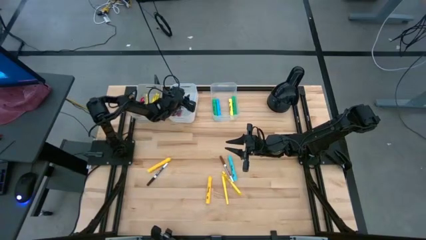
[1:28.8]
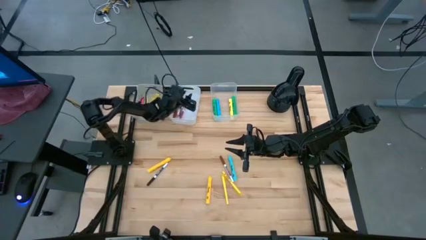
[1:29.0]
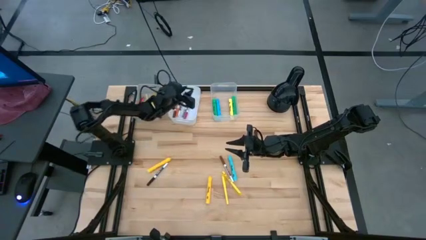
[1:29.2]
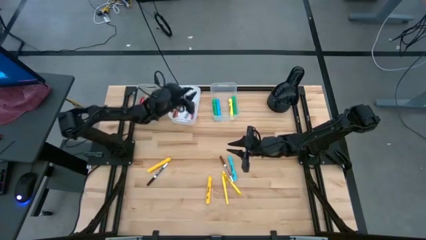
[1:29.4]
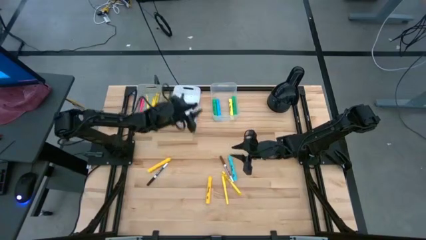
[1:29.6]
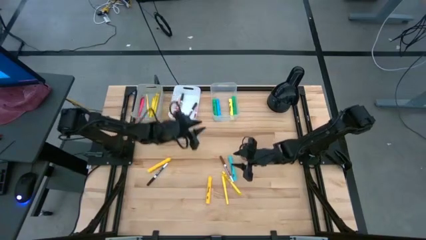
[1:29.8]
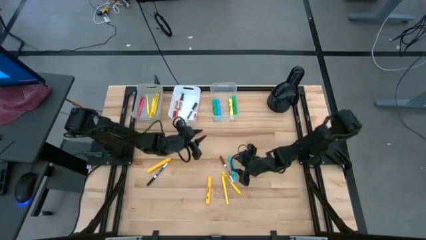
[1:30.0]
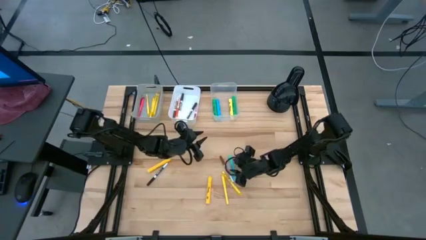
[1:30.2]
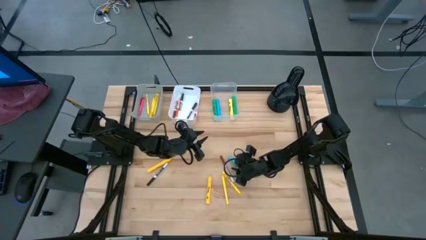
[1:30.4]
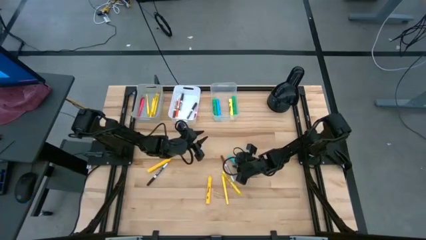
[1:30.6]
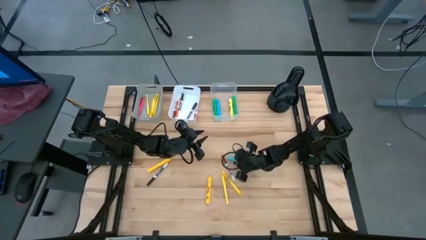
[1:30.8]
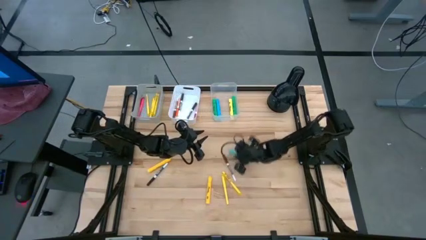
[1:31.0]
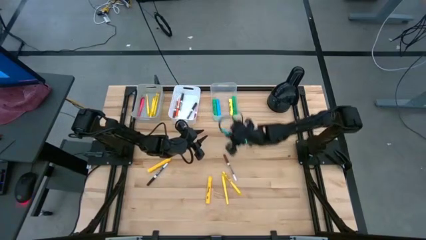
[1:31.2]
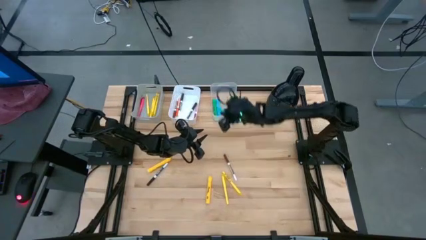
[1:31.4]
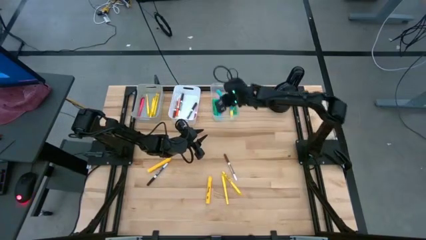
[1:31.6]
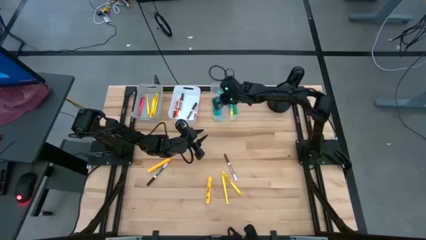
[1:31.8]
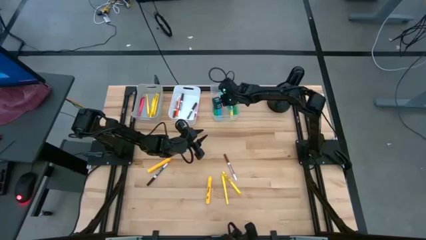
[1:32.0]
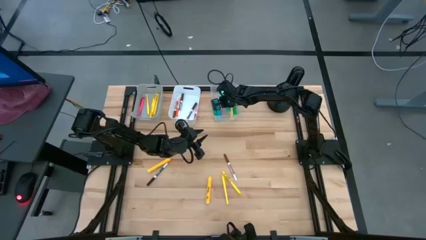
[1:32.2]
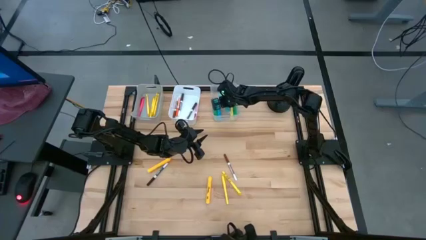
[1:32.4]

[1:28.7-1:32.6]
Task: Pick & Place Markers
Put the blue highlighter into the transparent bin

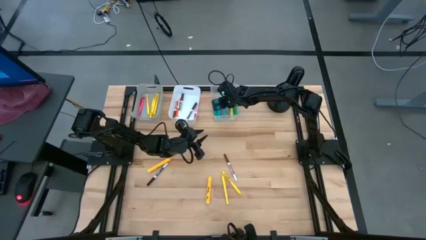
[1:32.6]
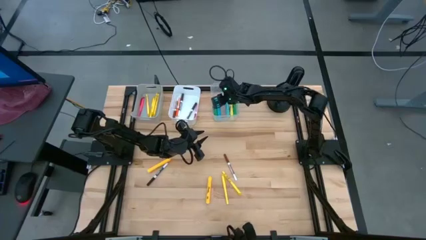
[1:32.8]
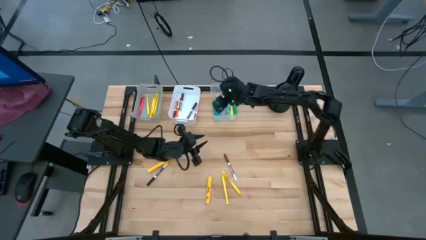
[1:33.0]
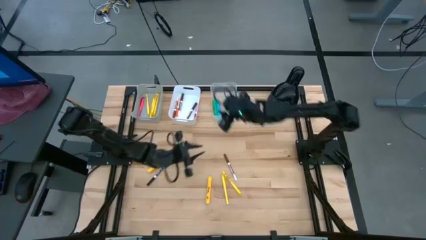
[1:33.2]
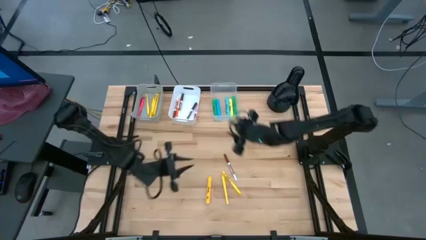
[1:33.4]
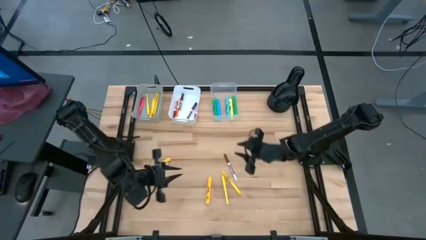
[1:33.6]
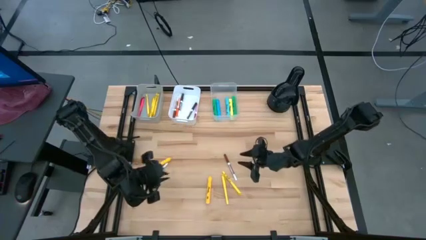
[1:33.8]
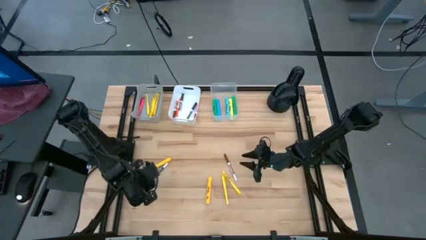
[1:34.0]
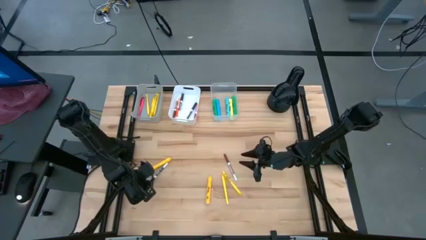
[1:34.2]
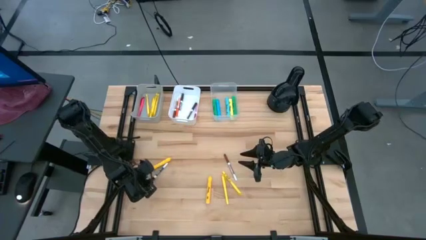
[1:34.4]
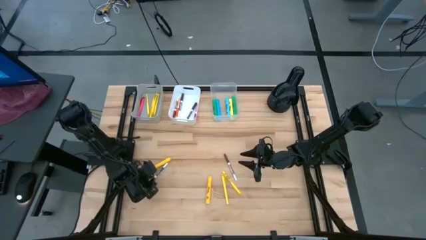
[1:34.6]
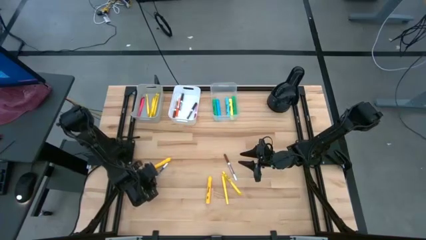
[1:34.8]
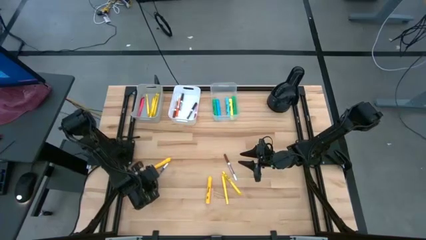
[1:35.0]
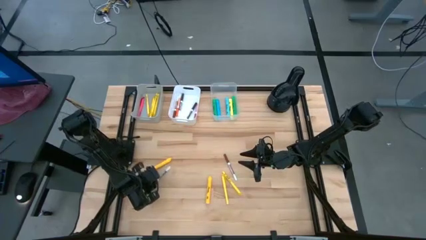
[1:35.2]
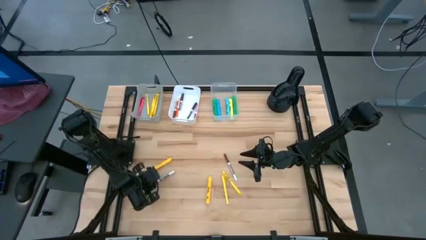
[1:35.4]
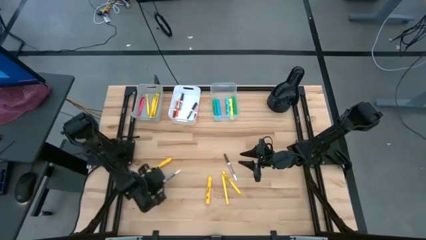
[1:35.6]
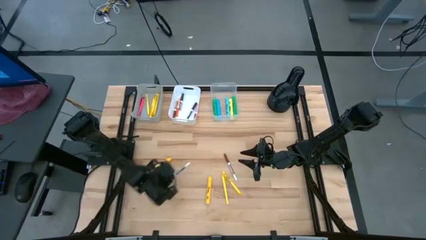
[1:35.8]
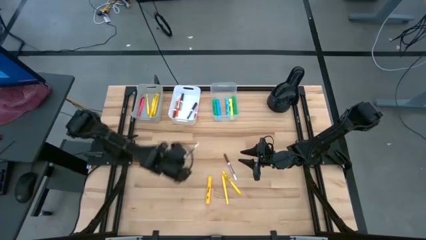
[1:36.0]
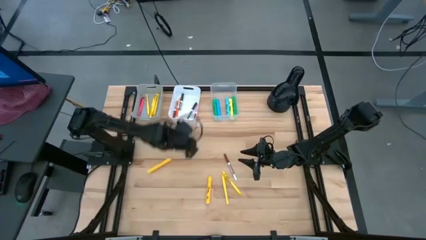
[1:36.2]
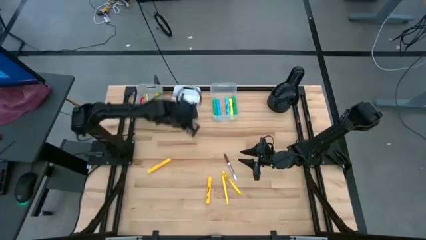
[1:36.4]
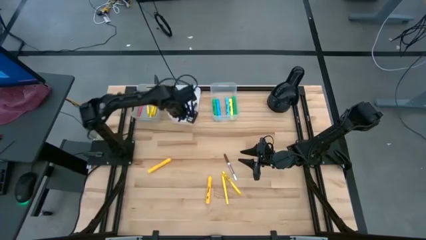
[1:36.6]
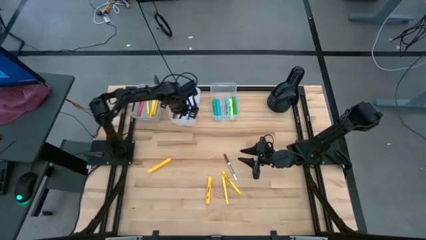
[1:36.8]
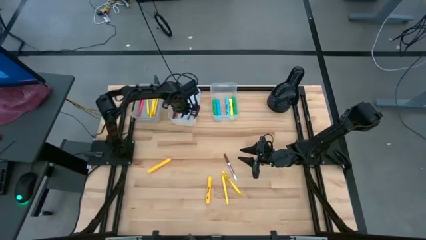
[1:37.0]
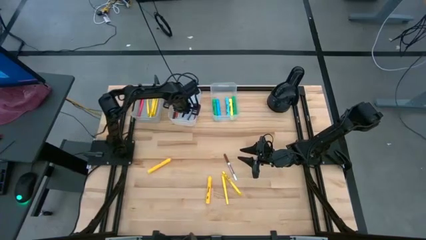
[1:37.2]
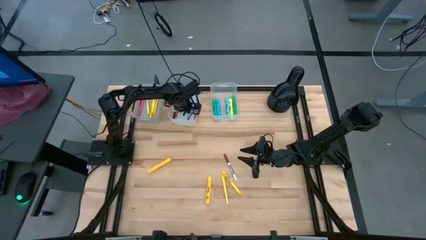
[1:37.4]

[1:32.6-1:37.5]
Put the black erase marker into the white bin

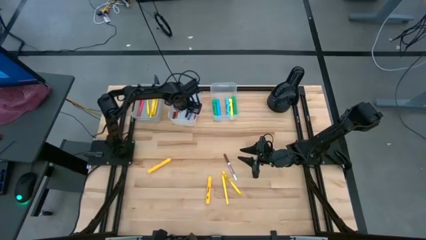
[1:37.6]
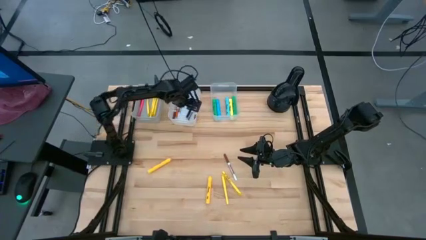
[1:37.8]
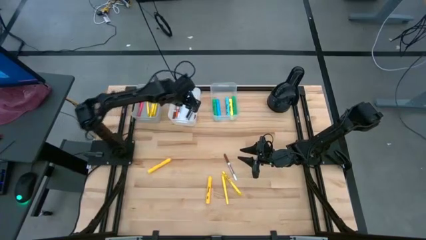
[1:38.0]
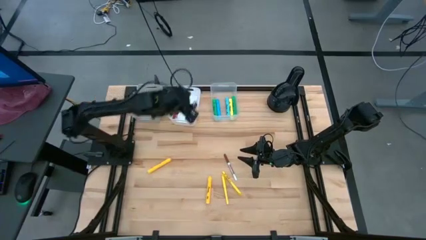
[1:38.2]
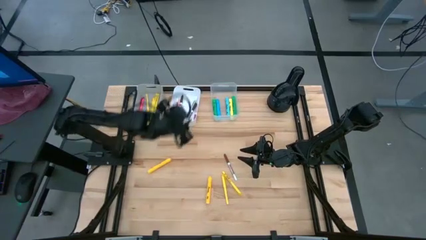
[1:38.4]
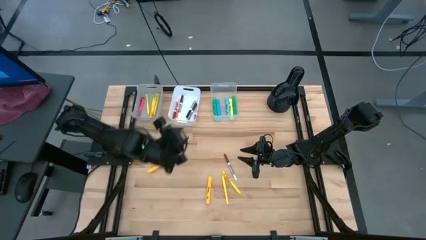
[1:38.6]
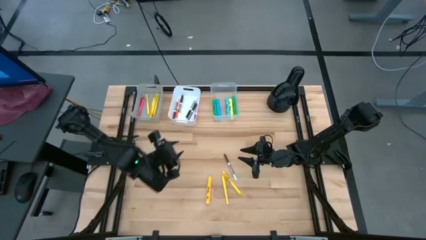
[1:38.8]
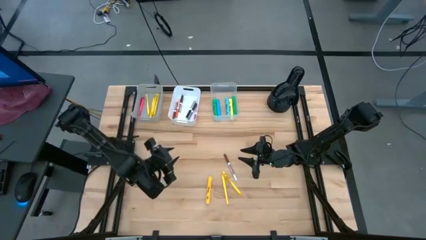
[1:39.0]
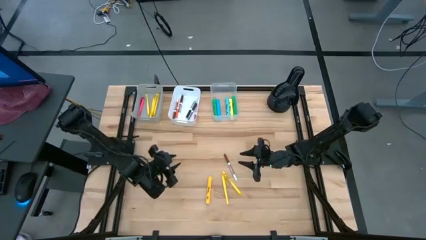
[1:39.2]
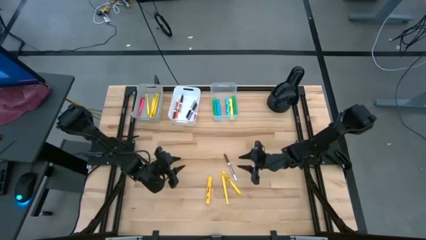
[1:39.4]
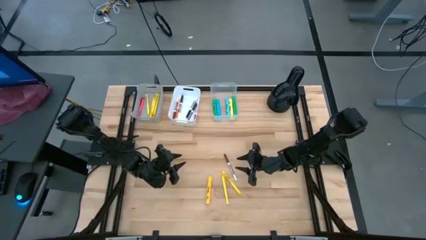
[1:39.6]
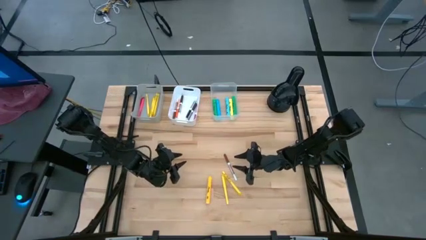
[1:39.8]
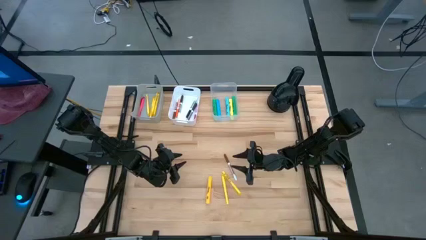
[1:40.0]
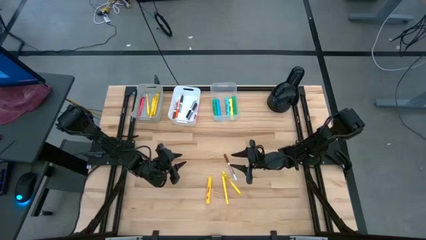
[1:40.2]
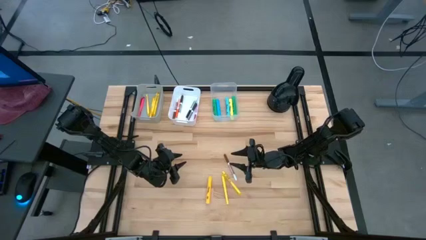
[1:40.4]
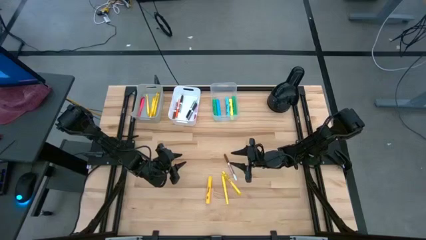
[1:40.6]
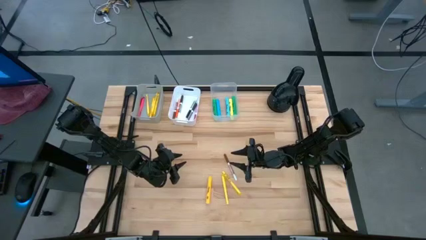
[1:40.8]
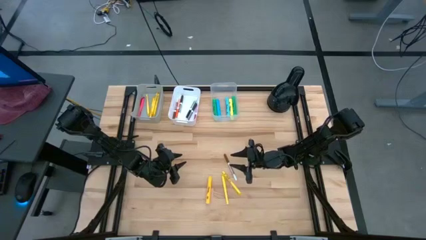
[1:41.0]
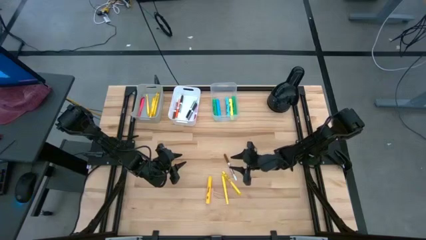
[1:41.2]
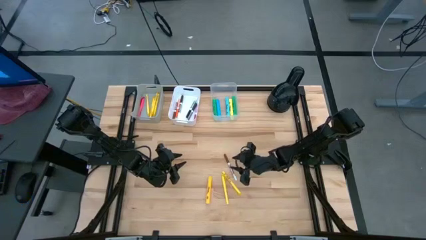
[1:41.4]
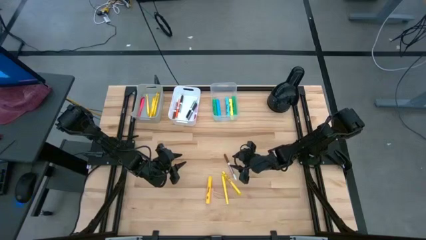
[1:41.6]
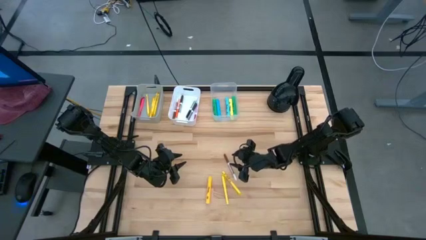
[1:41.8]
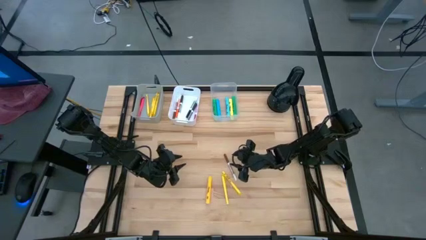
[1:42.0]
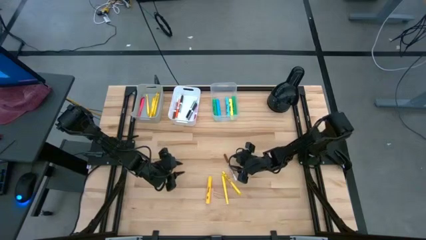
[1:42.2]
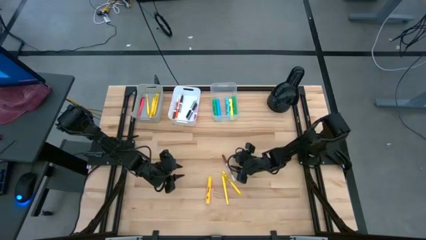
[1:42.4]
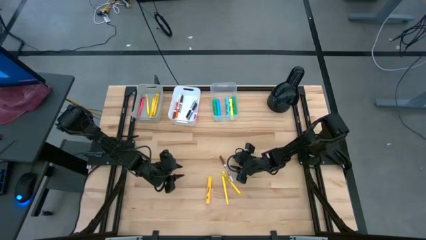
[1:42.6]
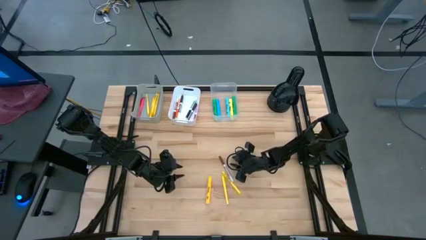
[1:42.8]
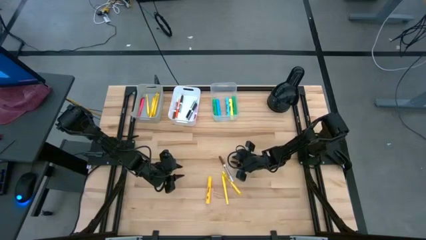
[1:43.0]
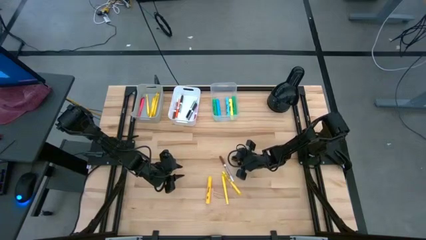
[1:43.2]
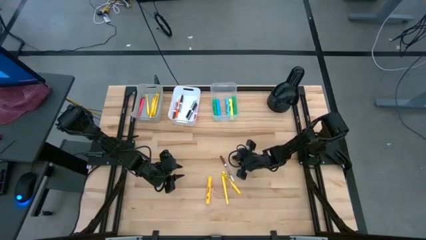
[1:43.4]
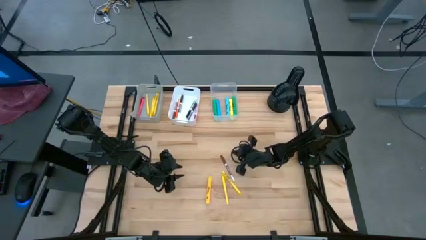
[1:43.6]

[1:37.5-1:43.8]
Put the brown erase marker into the white bin

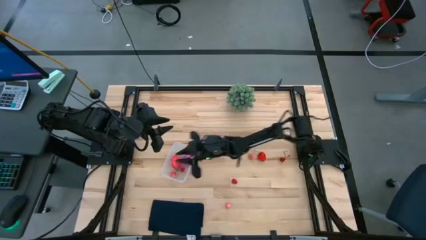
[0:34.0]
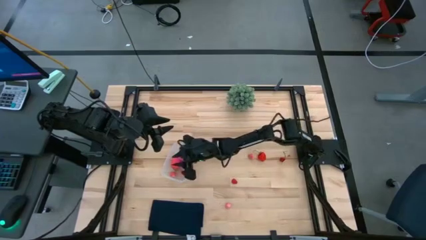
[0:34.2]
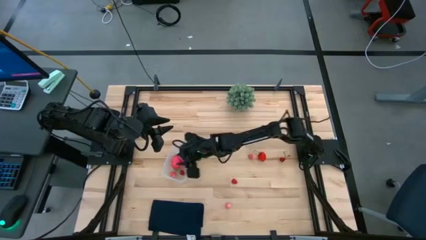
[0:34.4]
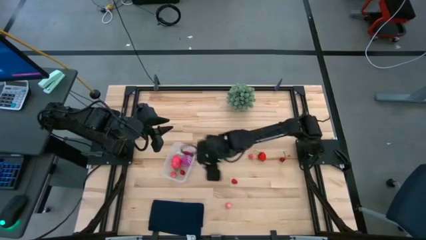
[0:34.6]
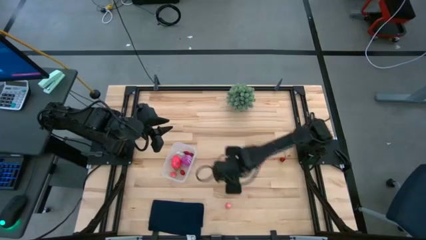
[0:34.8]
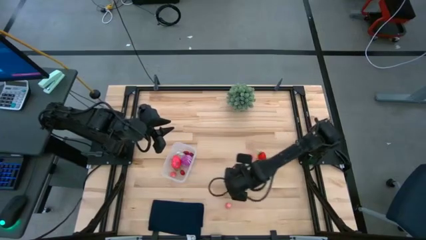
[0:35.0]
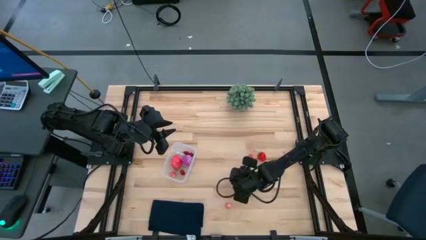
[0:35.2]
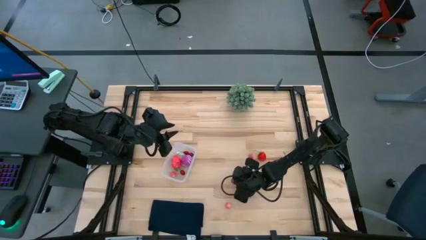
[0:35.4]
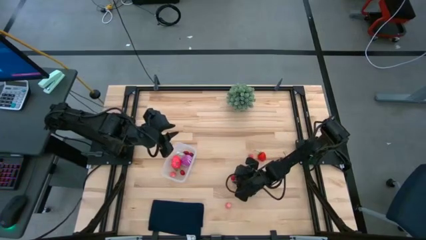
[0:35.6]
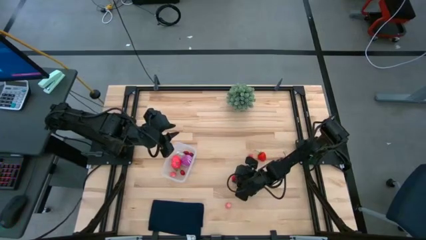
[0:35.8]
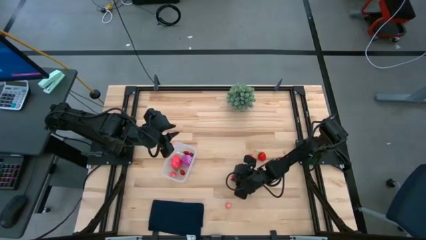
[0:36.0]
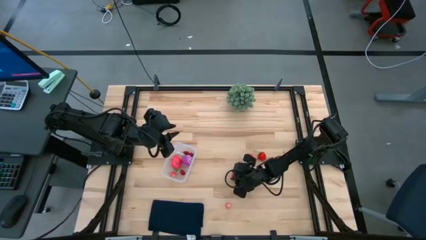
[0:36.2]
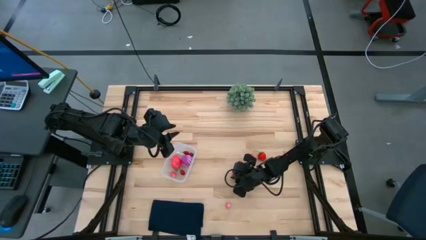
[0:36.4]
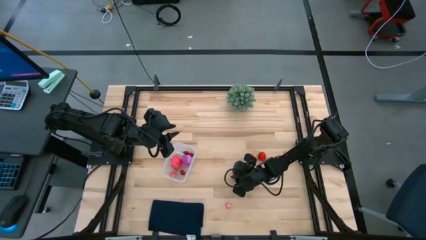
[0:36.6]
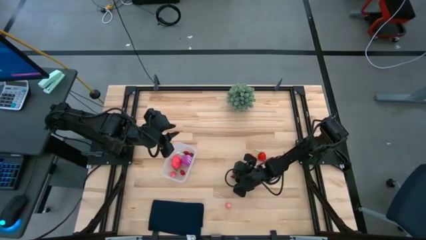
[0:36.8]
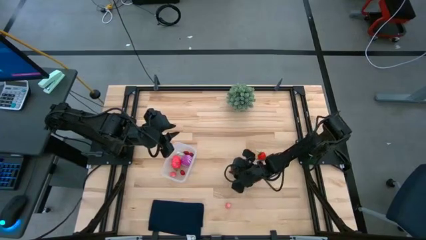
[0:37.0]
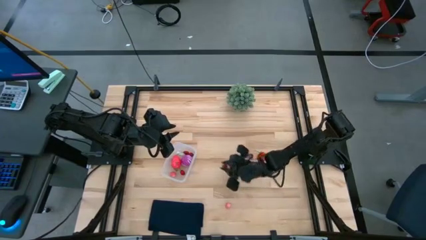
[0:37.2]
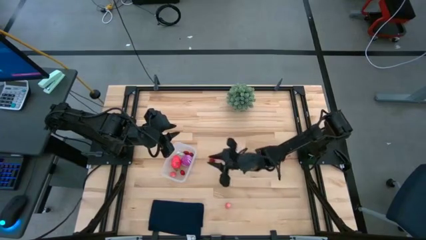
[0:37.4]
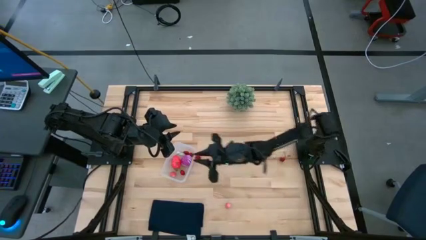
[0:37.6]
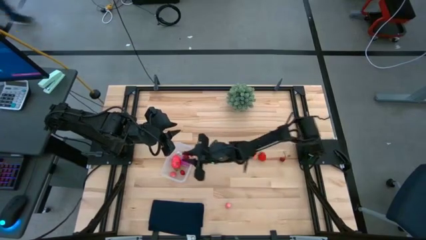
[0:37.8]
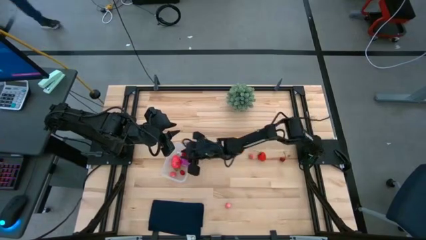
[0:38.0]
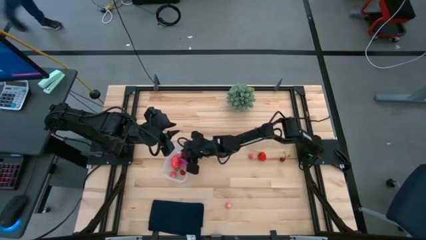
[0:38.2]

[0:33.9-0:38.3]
Task: Pick and placing Produce into tupperware
Put the red raspberry into the transparent bin
